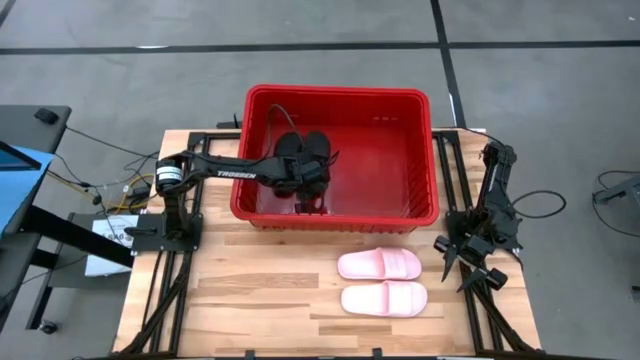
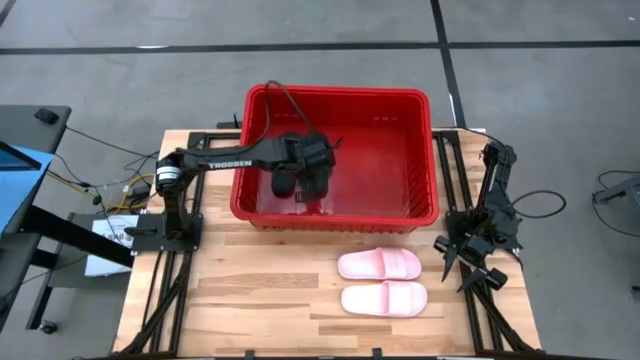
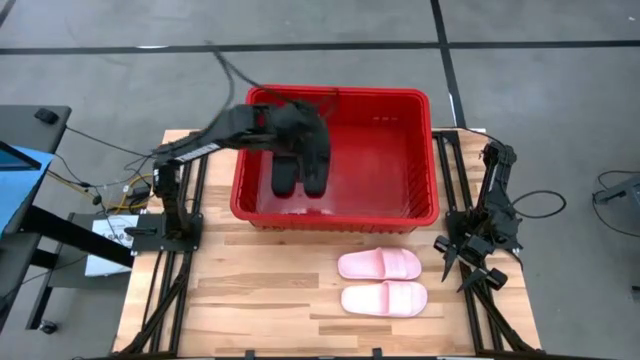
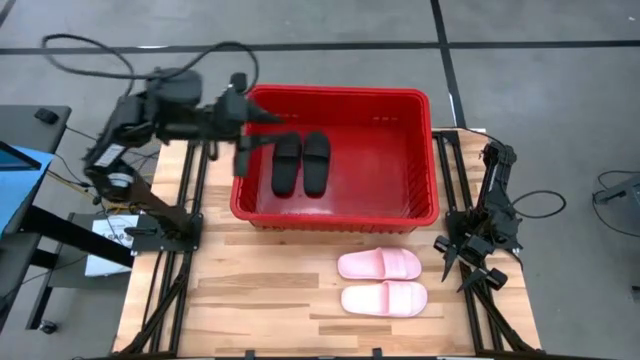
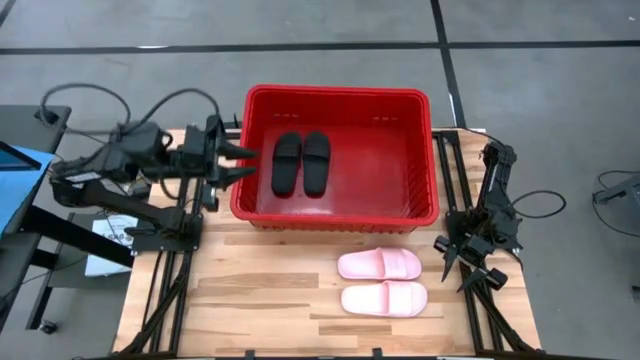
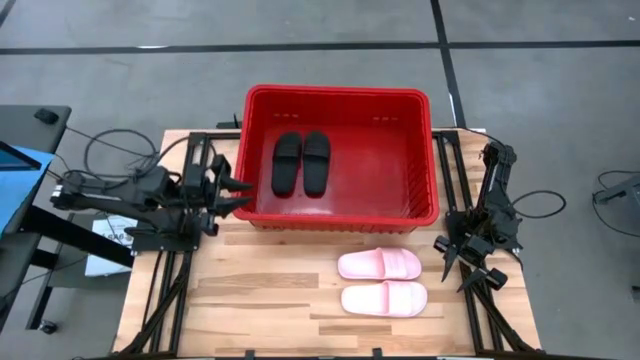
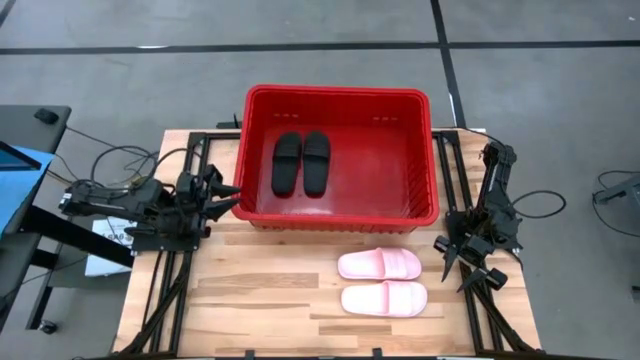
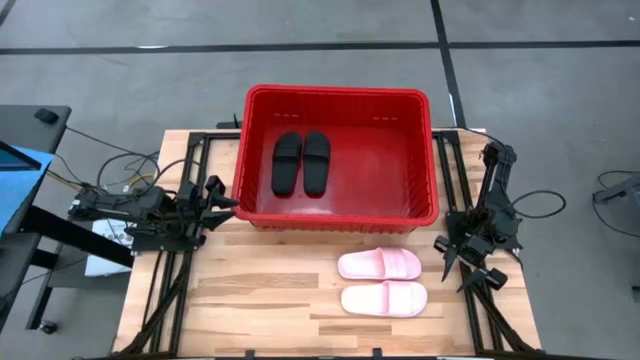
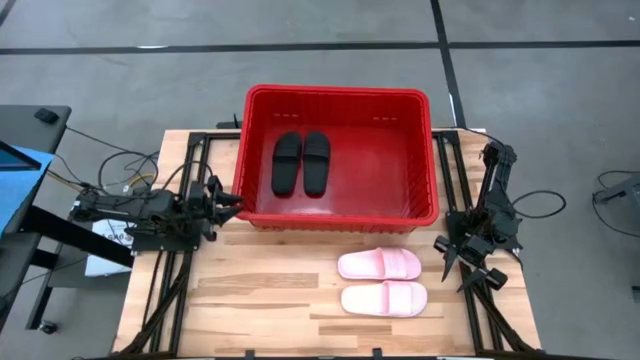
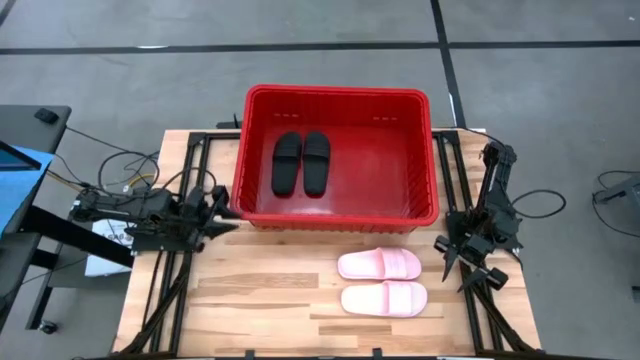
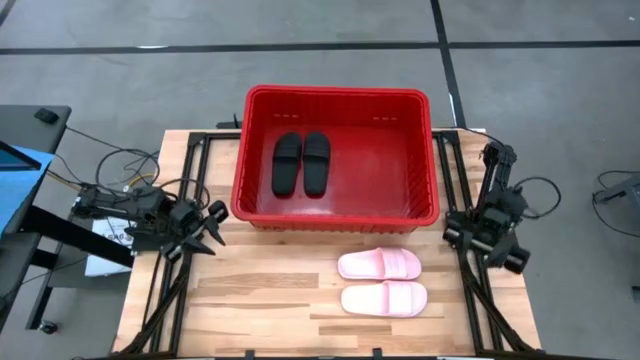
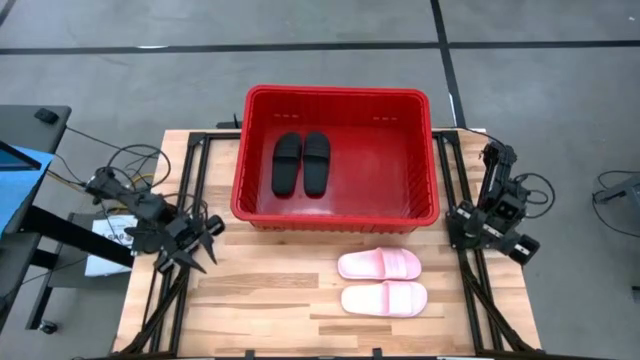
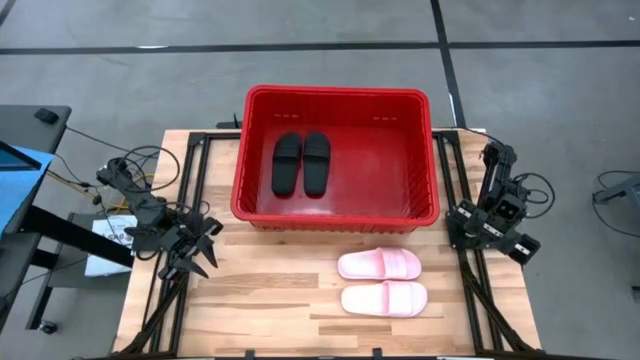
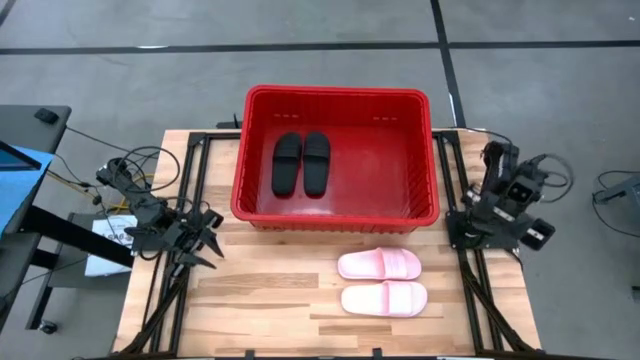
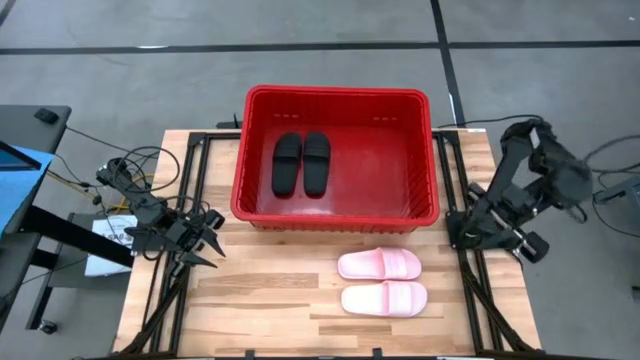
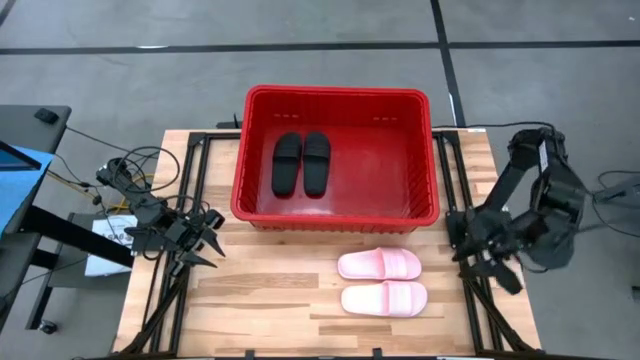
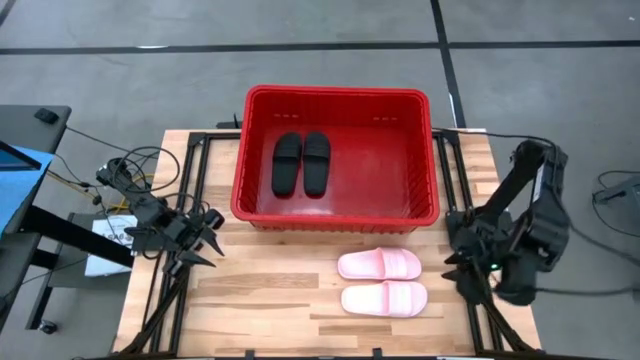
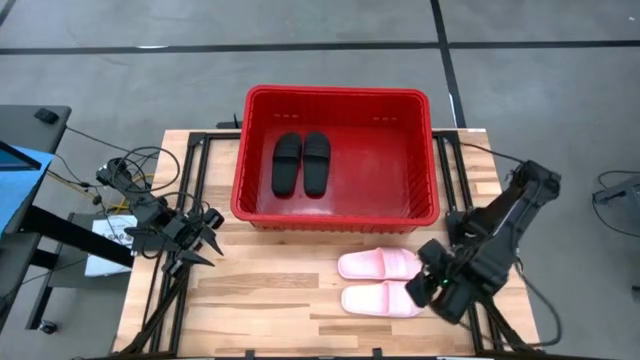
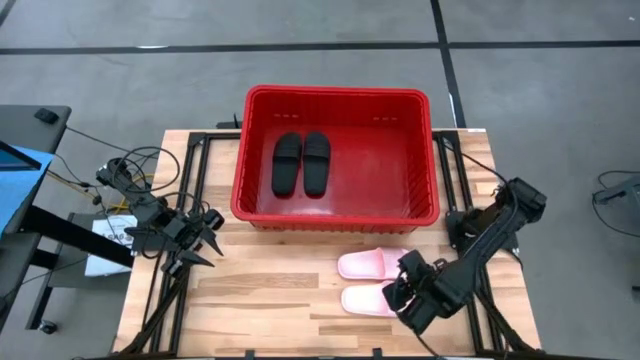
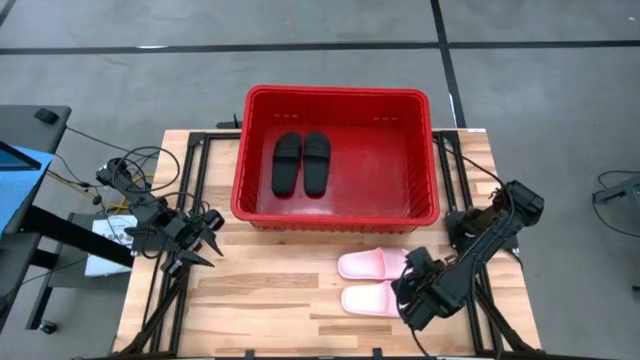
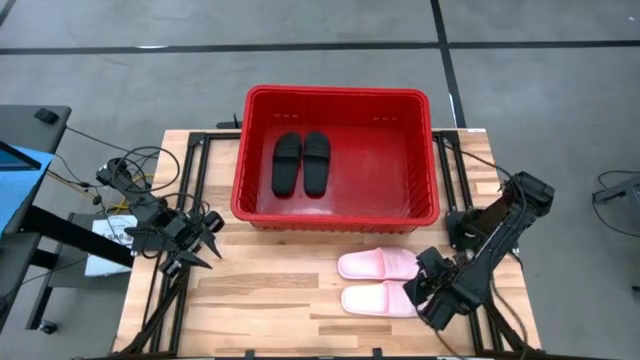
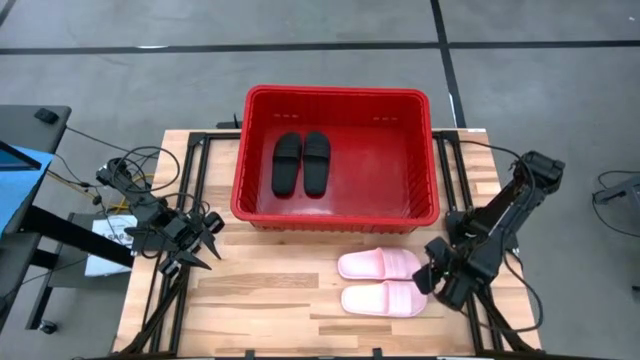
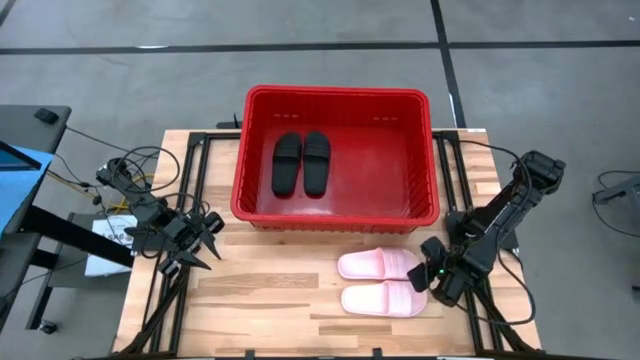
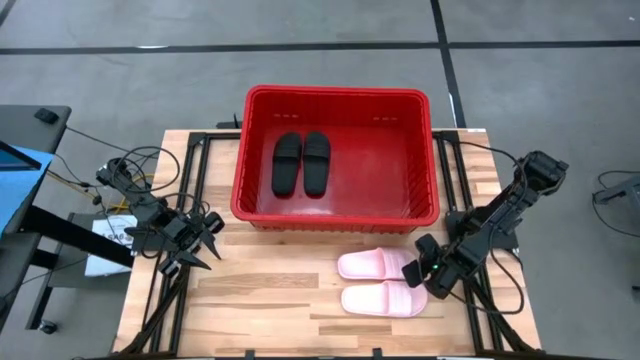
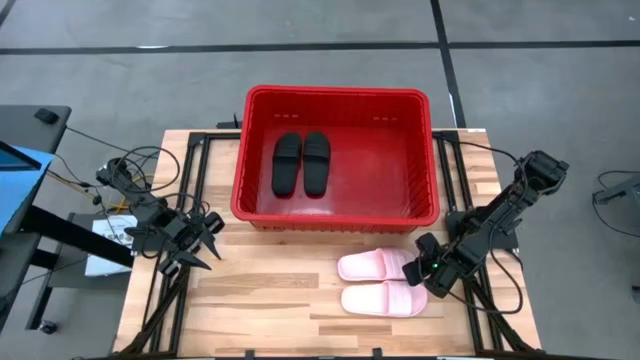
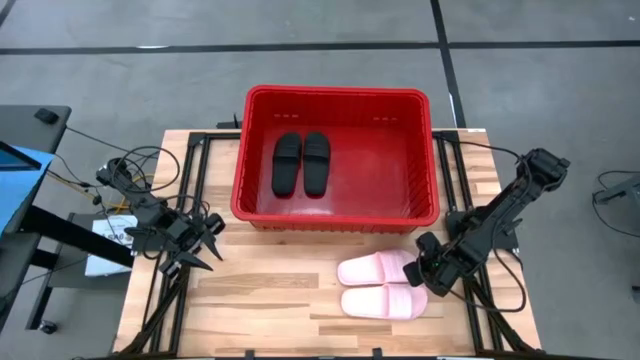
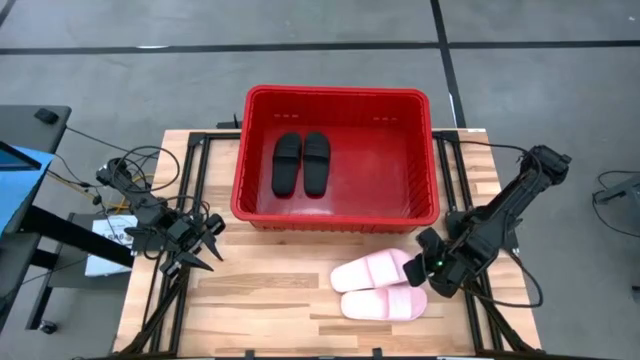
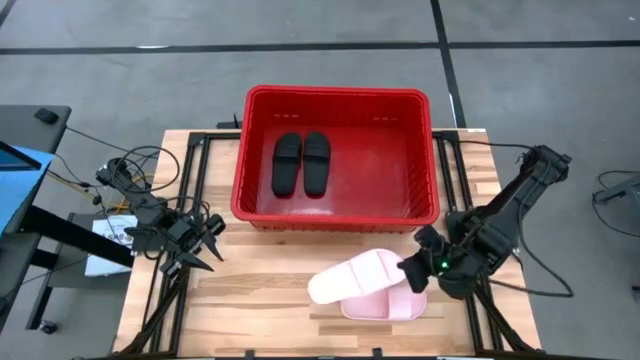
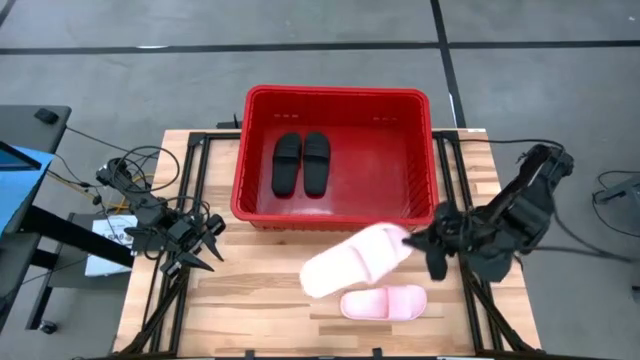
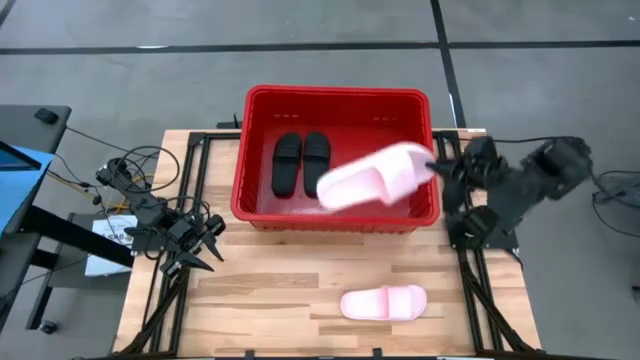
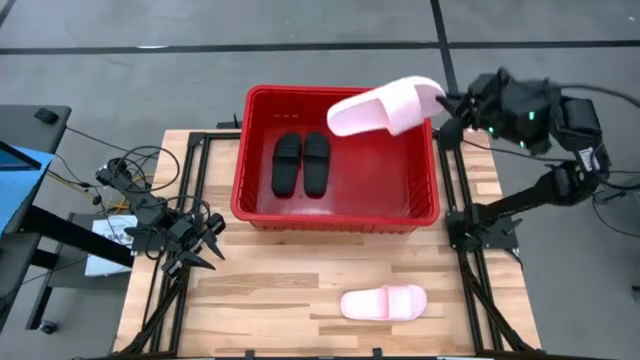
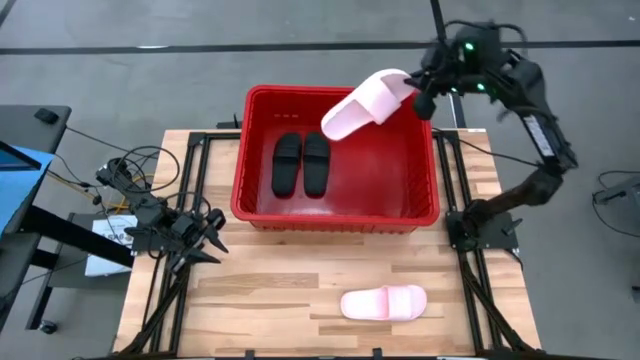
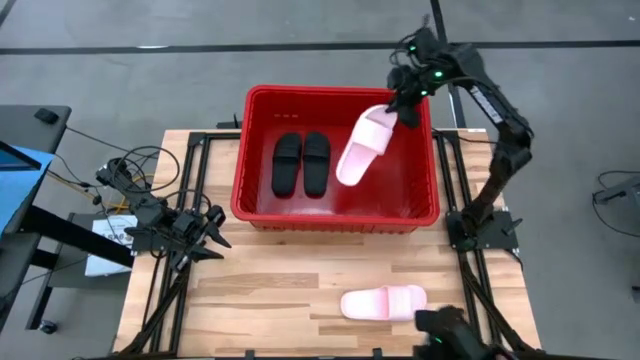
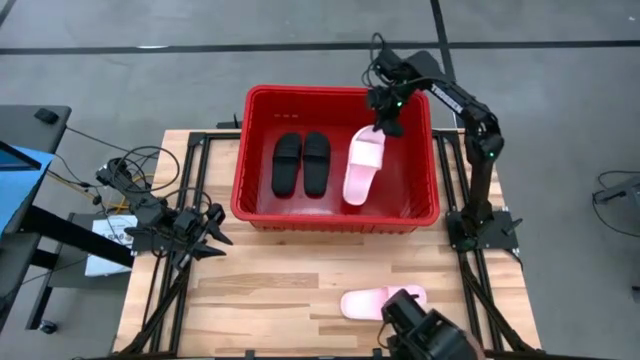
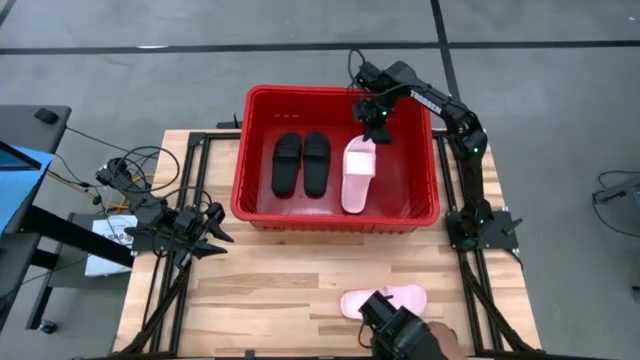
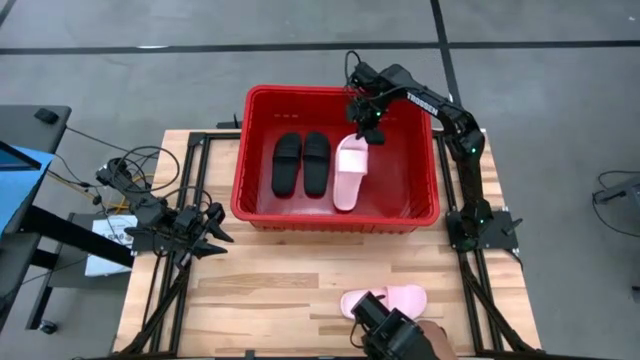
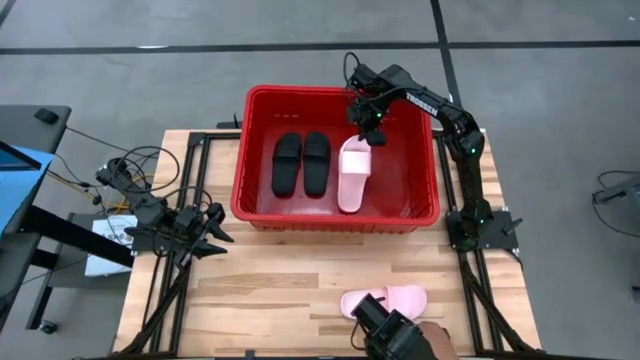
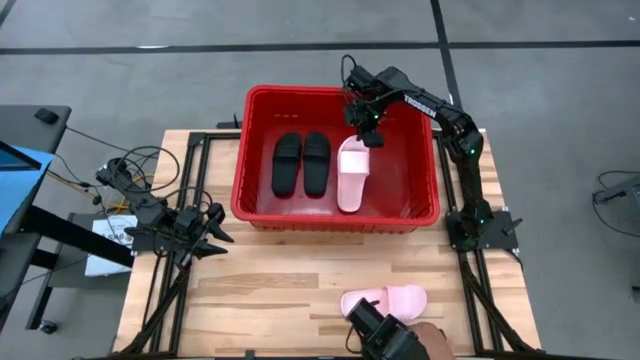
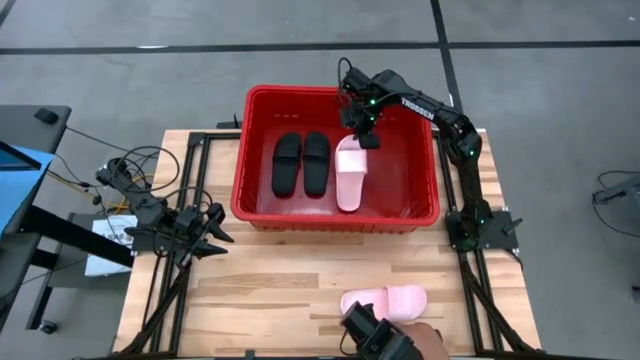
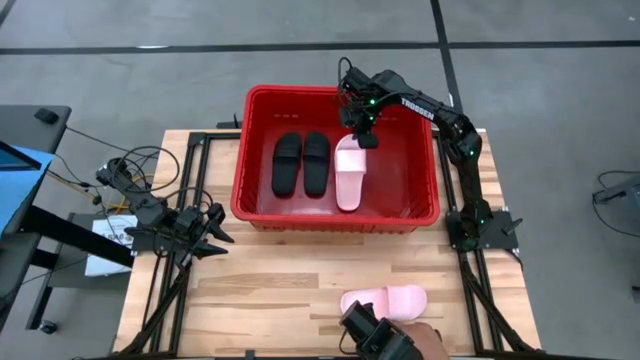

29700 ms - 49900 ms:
Task: Pick and place slides into bin
Put the pink slipper into the red bin

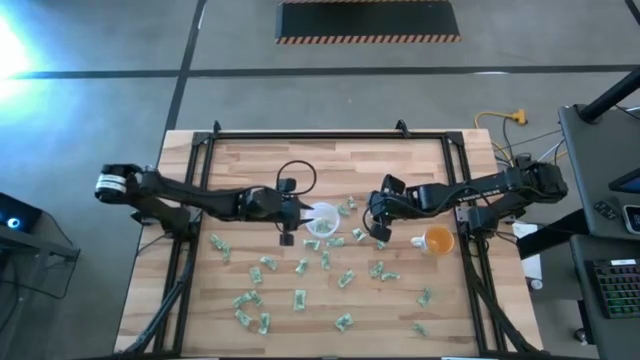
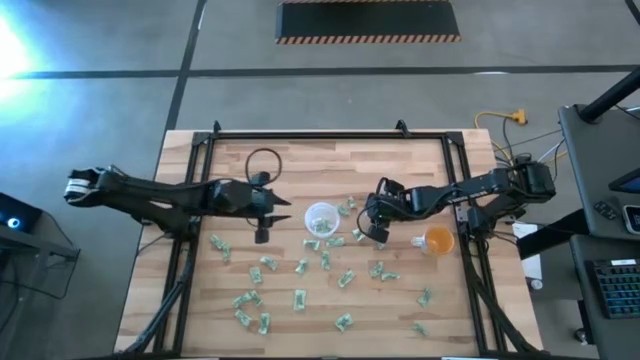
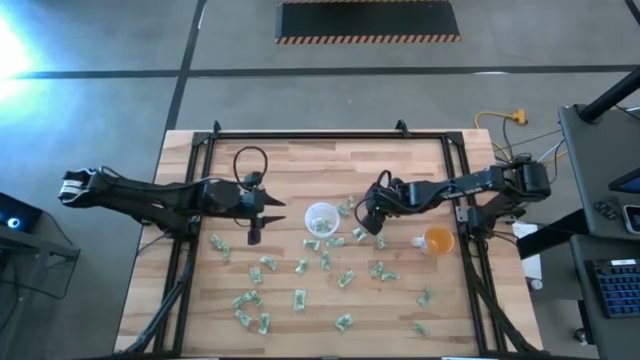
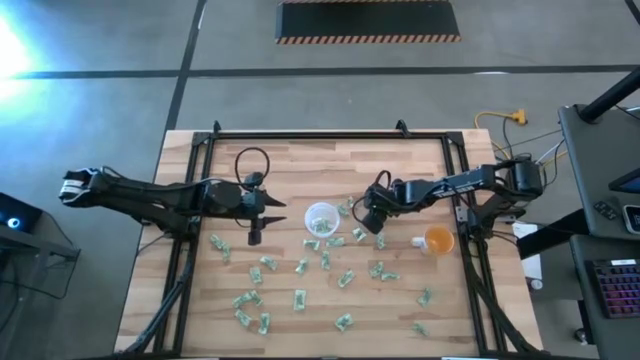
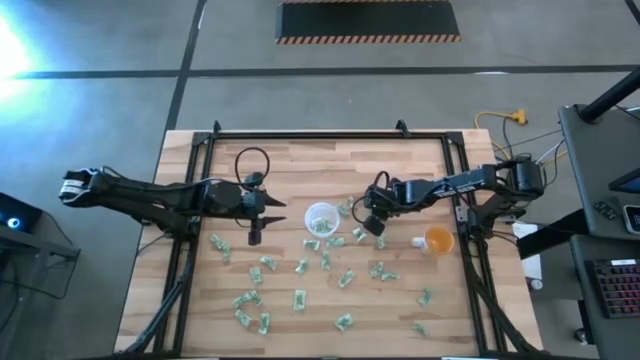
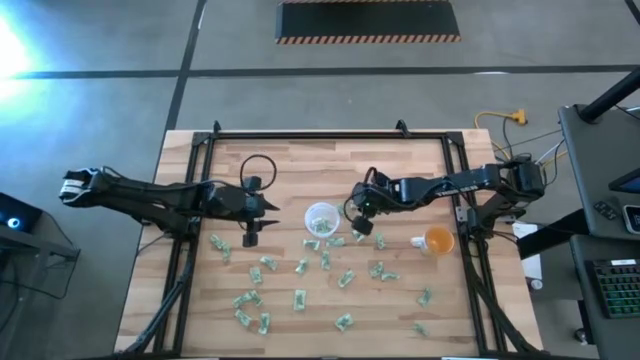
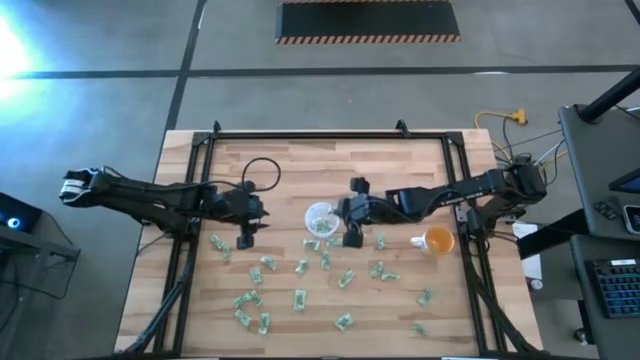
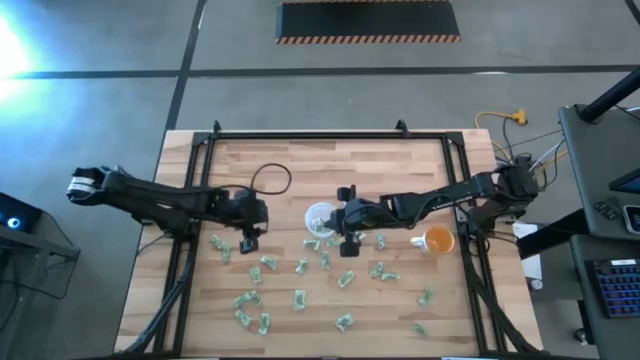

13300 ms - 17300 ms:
Task: Pick and place Stevia / Truvia into bins
Put the light green stevia packet into the transparent container
